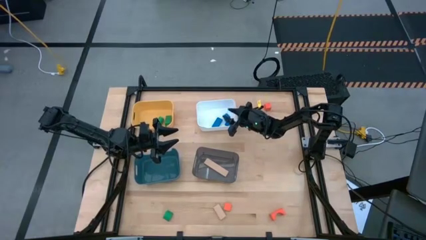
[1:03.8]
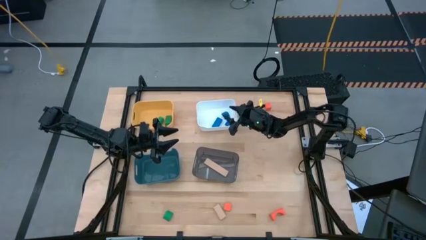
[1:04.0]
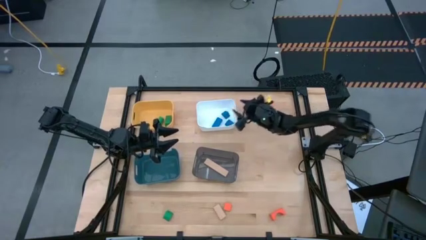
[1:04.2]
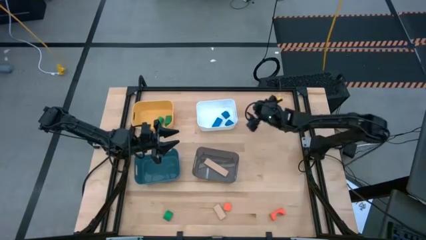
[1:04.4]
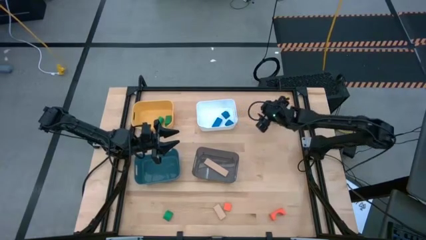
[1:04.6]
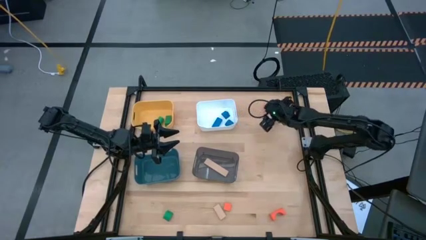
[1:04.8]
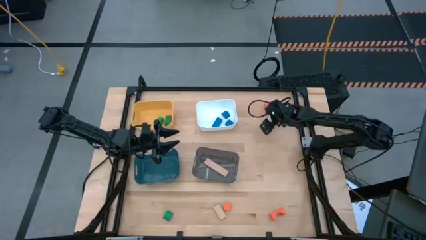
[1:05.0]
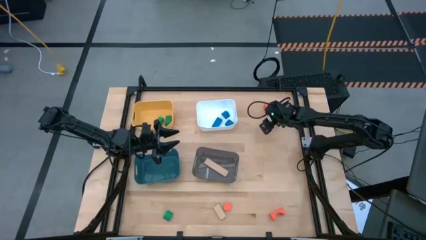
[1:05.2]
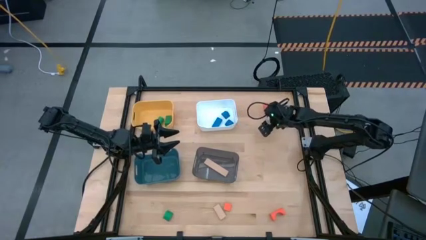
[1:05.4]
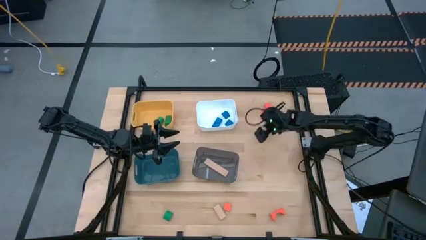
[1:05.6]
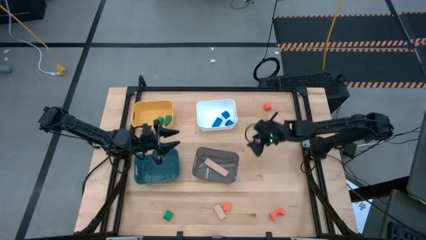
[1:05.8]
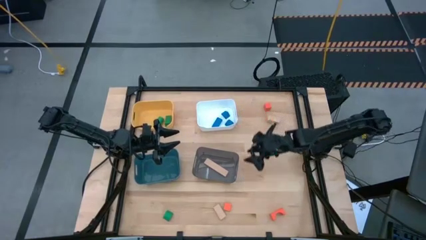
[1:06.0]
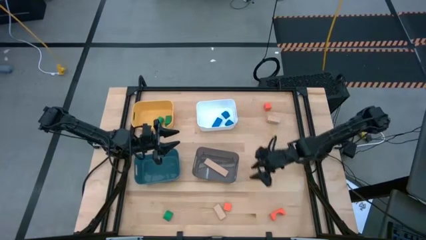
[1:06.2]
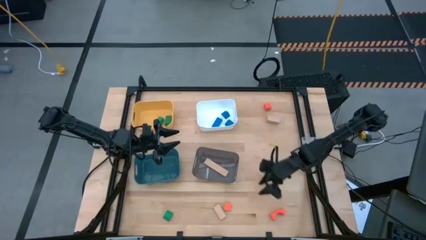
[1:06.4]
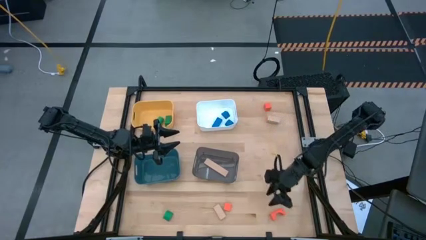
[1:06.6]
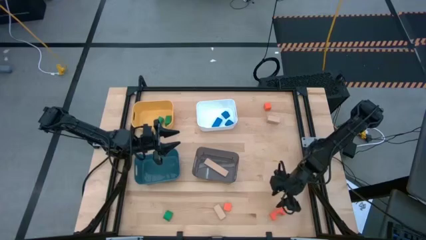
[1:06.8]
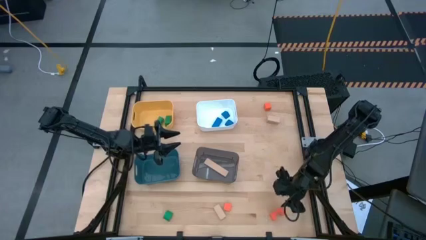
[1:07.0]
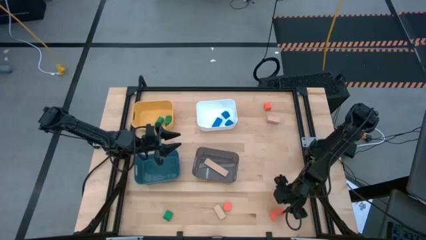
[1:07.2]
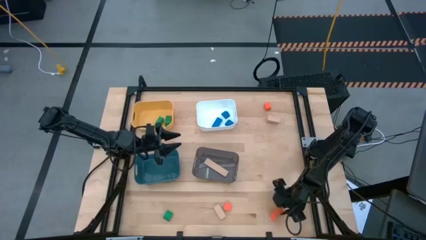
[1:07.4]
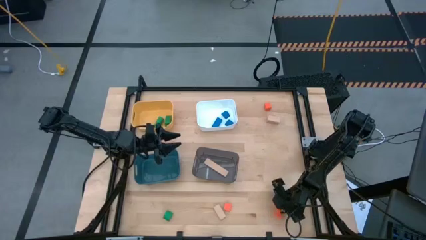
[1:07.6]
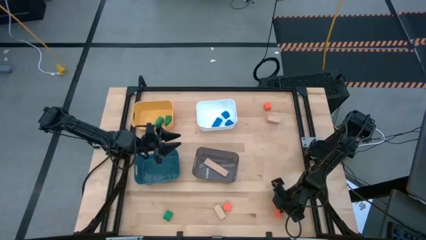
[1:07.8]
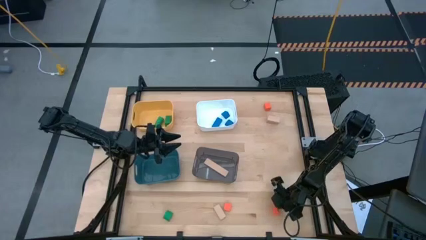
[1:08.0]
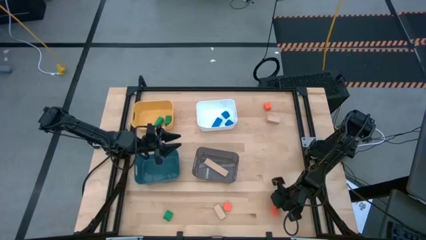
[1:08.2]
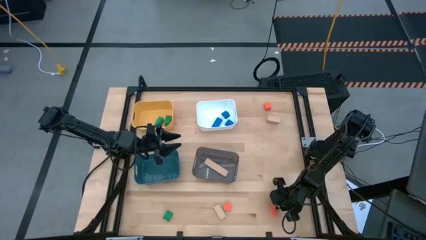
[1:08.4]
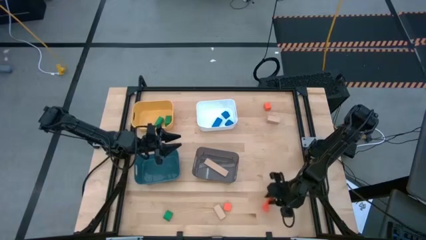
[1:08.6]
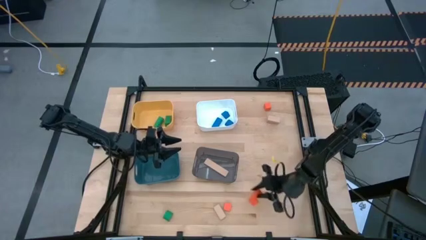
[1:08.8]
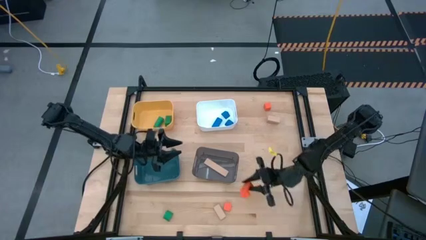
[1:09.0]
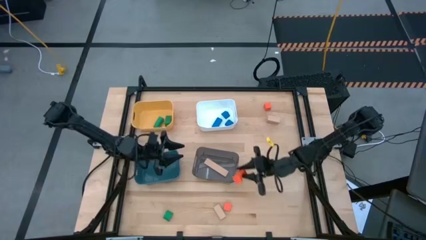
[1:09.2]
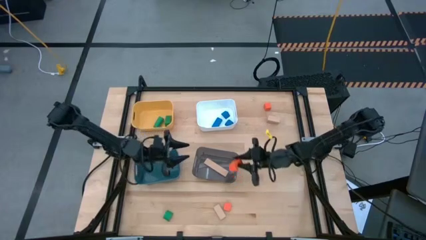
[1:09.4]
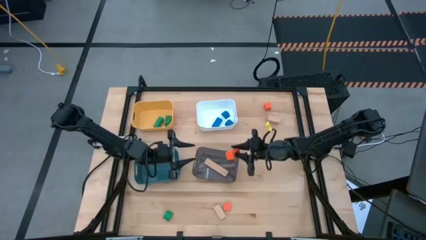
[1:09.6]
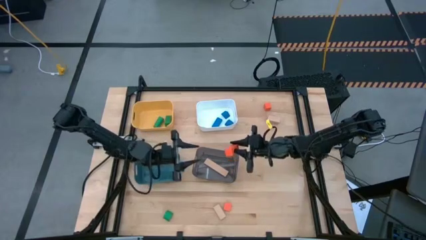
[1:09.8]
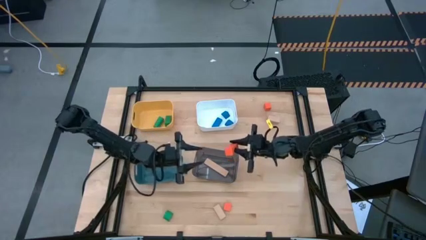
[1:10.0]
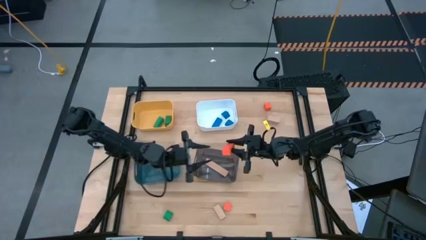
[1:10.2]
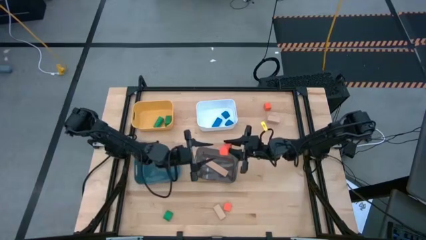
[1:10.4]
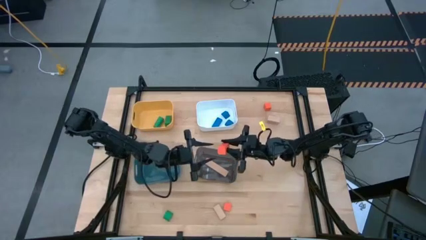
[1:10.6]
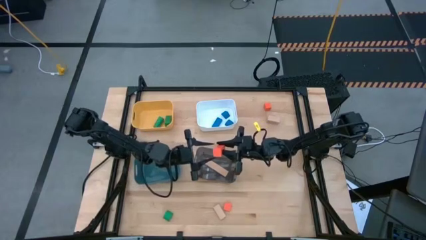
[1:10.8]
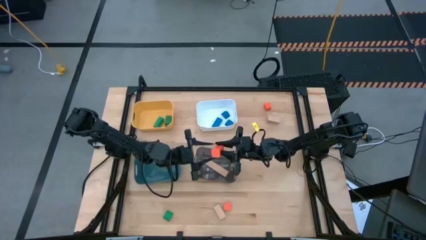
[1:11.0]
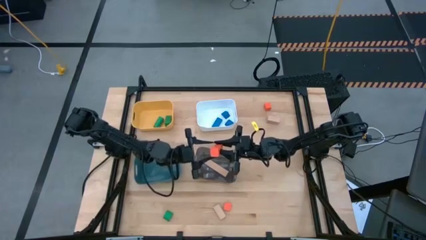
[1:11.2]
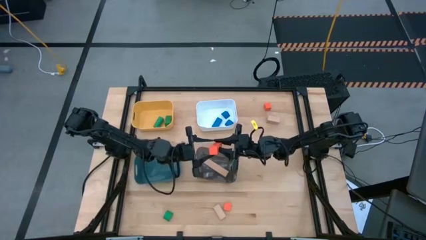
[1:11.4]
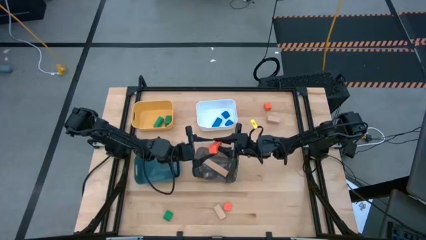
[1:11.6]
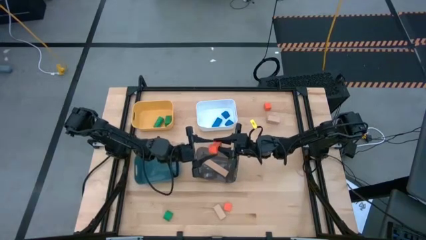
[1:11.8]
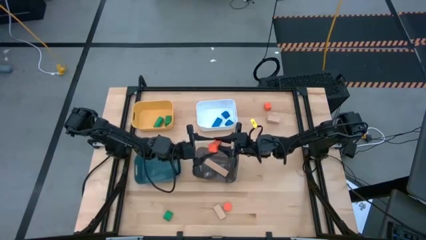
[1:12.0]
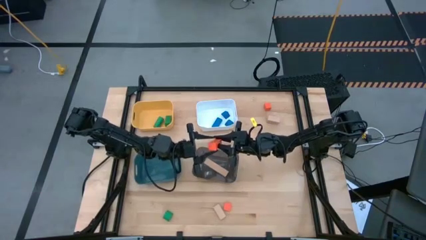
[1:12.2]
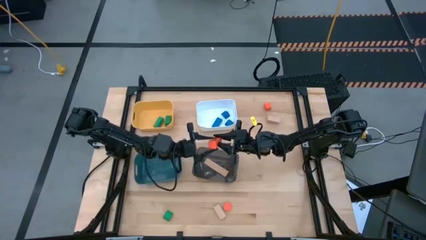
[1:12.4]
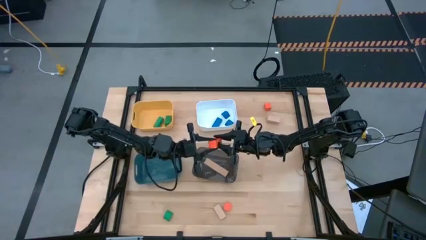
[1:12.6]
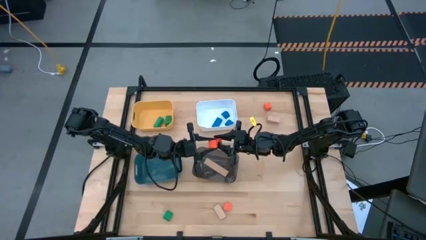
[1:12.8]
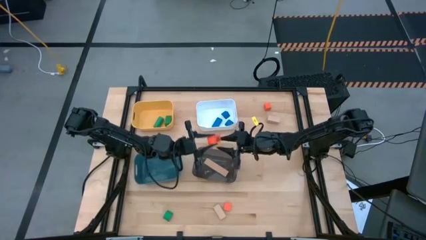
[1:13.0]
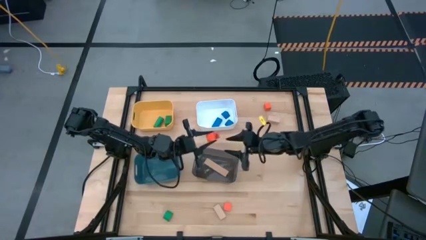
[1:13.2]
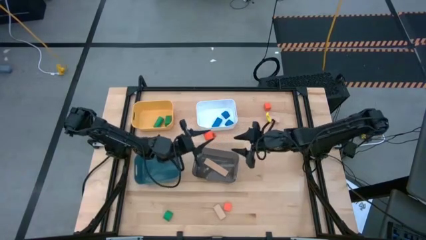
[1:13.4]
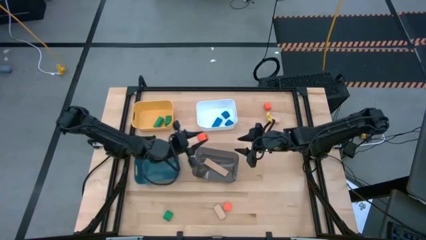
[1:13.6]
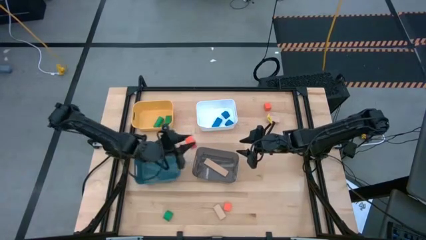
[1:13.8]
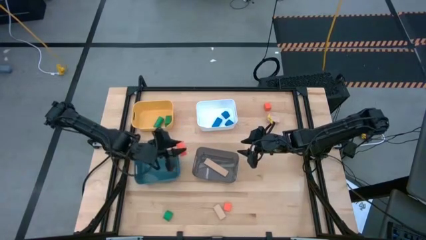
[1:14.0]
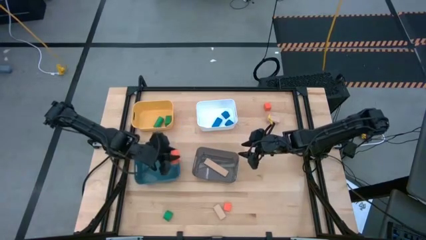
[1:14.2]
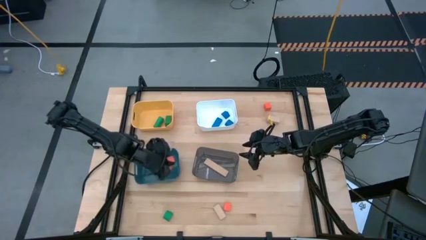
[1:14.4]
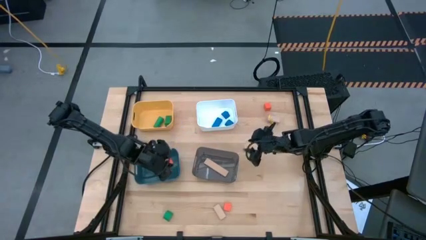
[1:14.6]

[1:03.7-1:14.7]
Task: Sort & place blocks by color
Put the bottom right orange block into the blue bin
